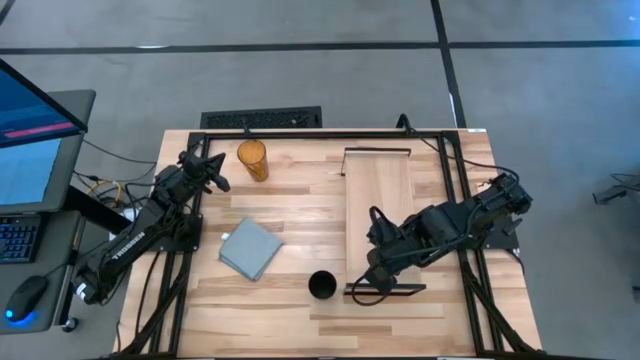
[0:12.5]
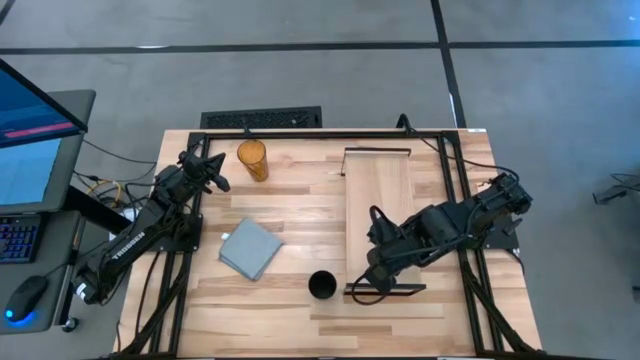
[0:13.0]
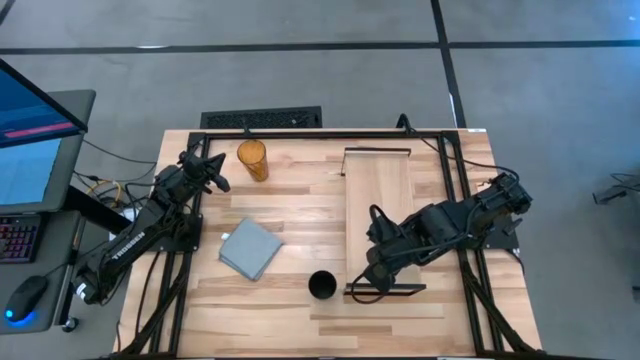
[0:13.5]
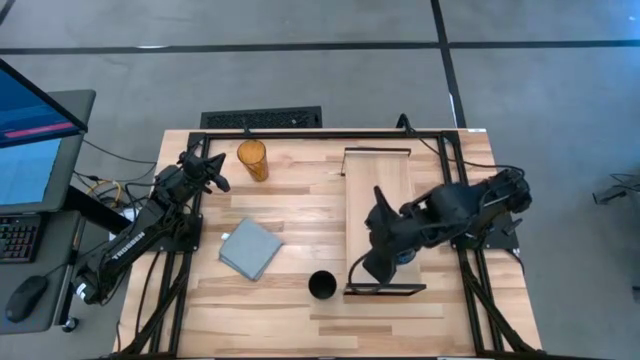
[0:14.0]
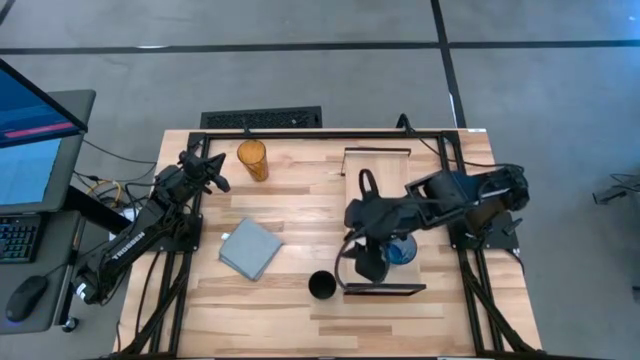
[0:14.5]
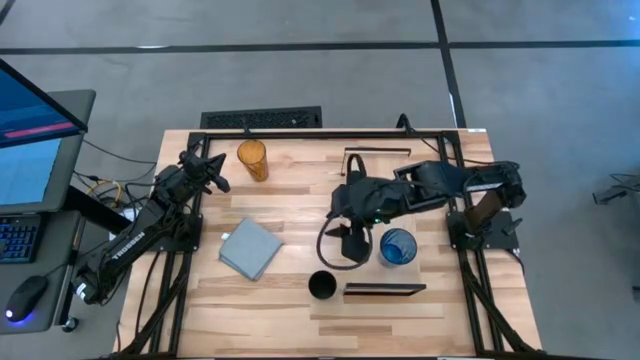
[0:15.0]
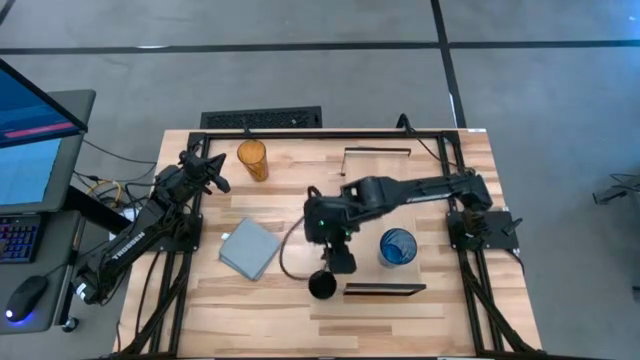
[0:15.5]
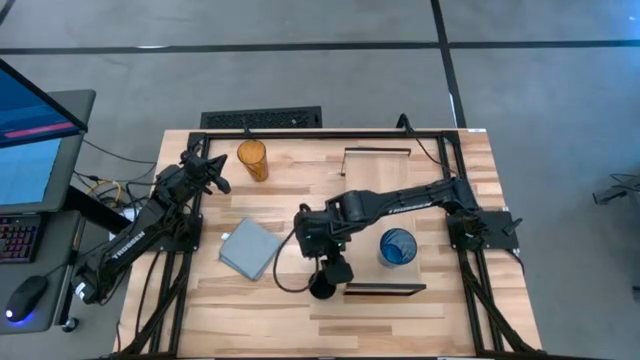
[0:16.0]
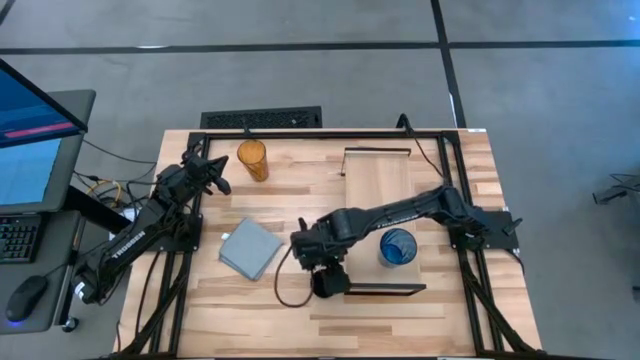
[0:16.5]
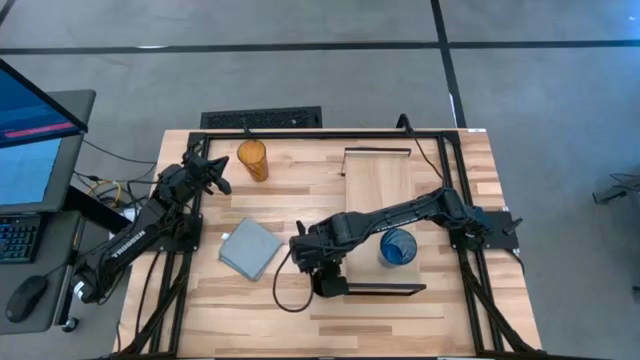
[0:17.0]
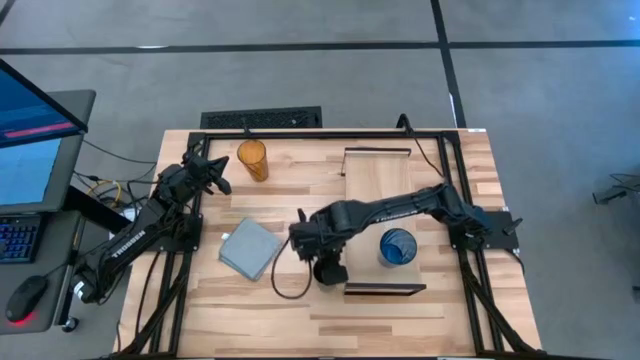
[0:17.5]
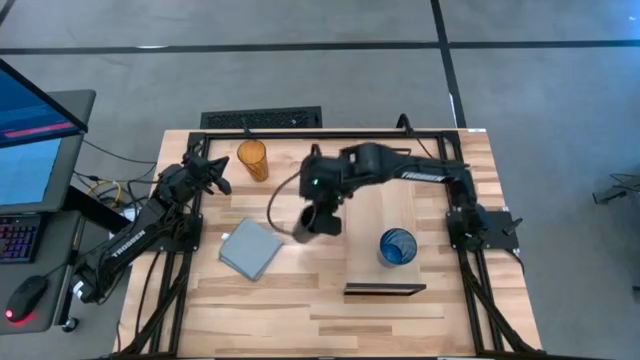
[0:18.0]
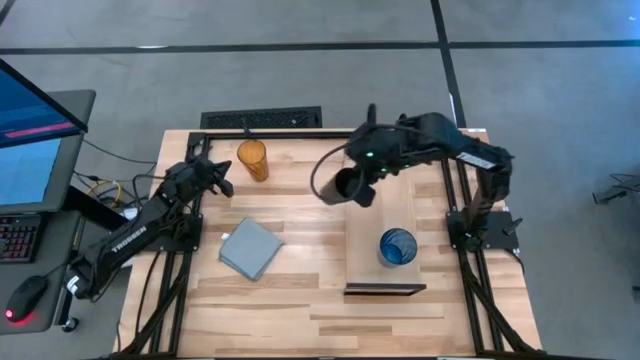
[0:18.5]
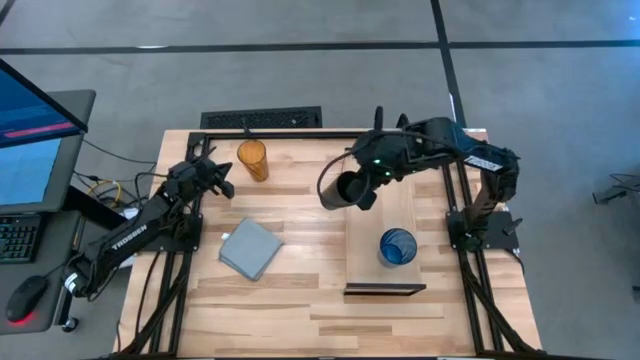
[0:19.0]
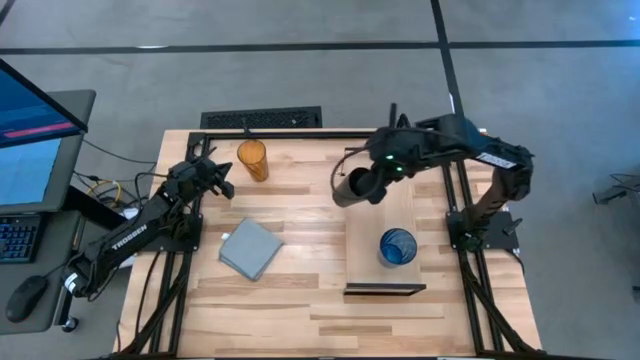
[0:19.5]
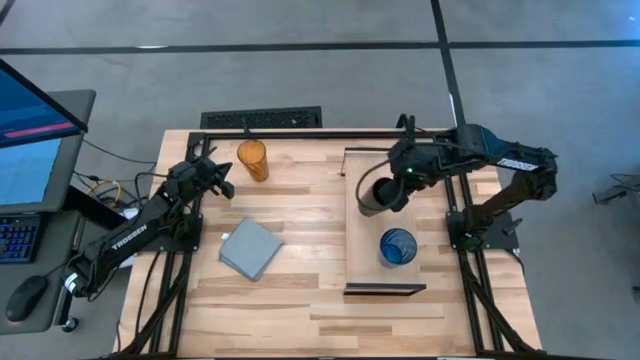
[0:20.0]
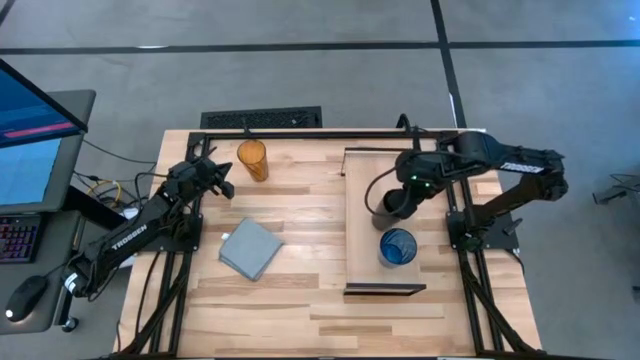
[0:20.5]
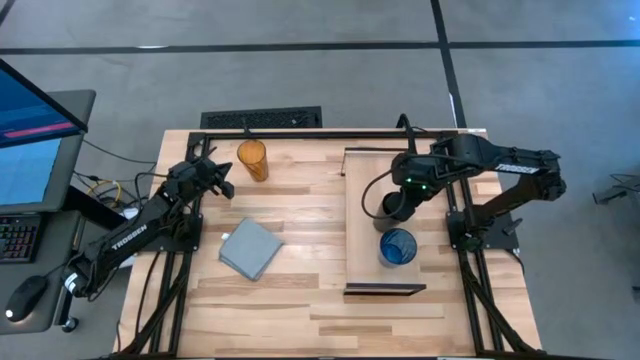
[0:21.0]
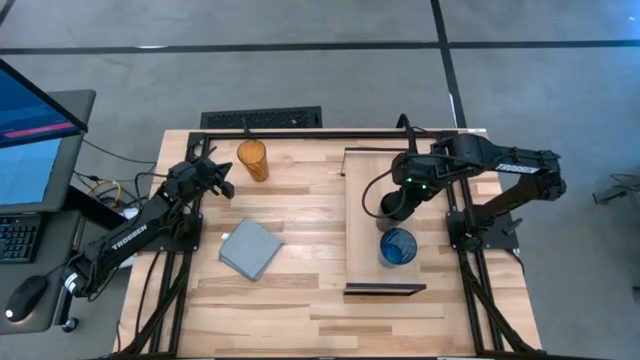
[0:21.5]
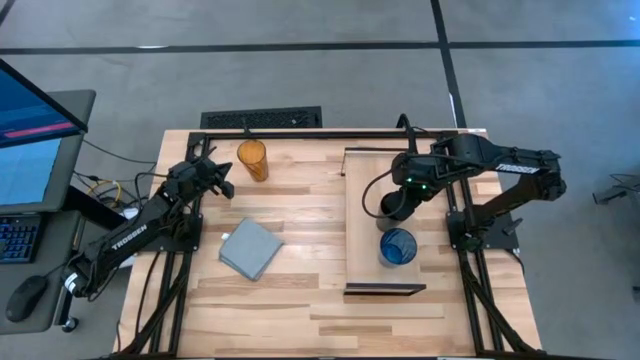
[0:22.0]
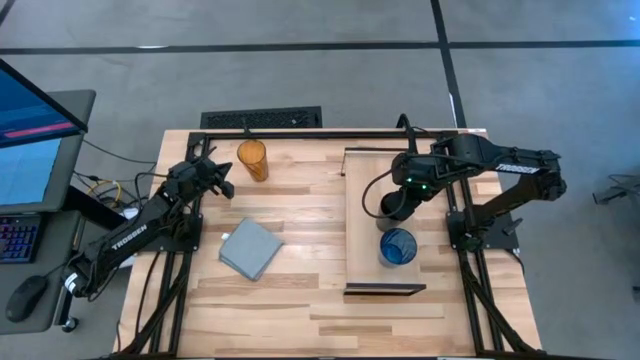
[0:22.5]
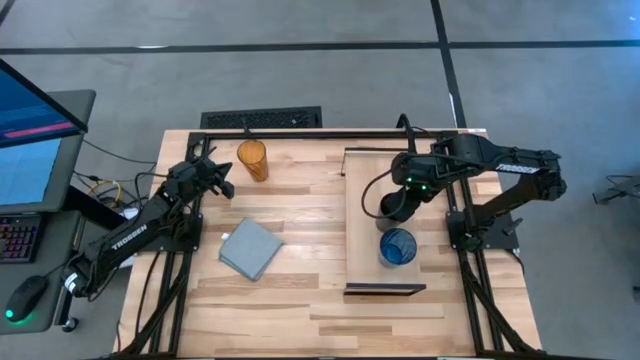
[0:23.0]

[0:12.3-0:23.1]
Task: Stack small to large cups/mugs on shelf
Put the black cup on the shelf

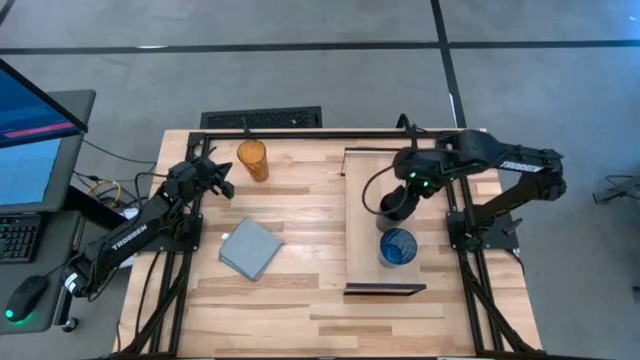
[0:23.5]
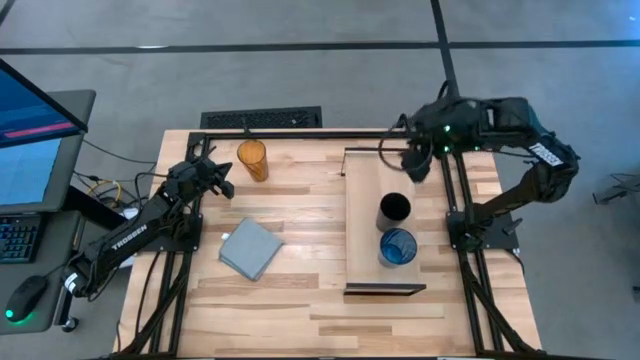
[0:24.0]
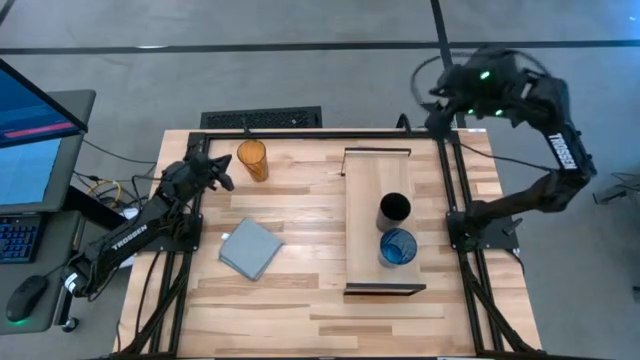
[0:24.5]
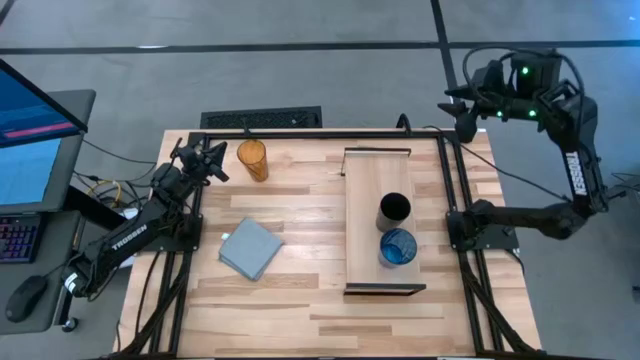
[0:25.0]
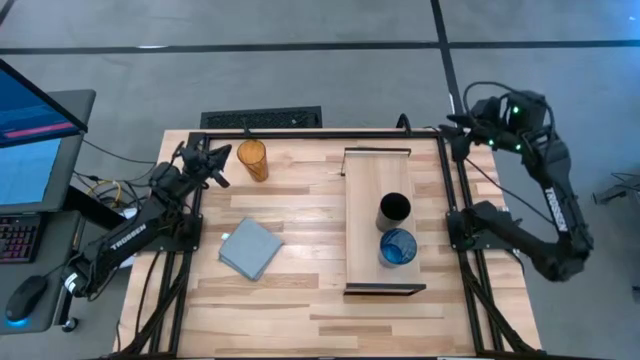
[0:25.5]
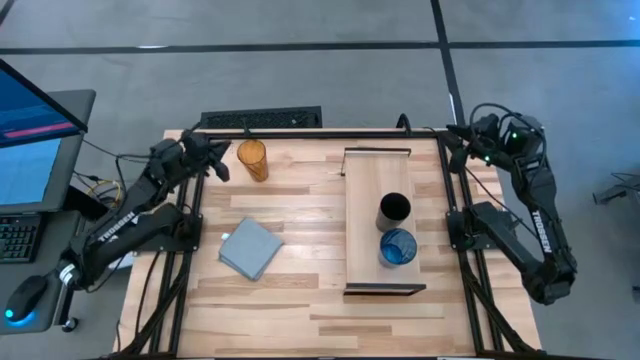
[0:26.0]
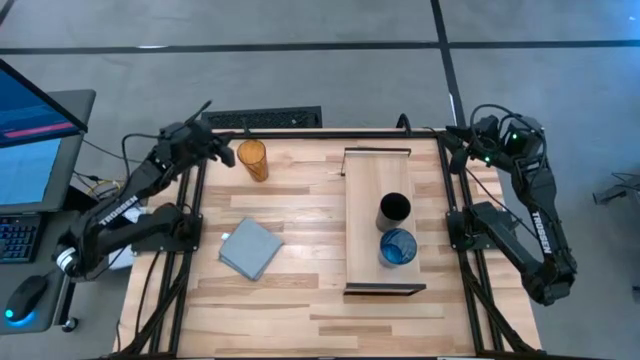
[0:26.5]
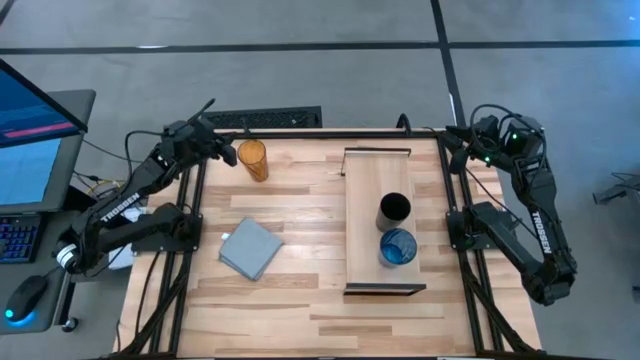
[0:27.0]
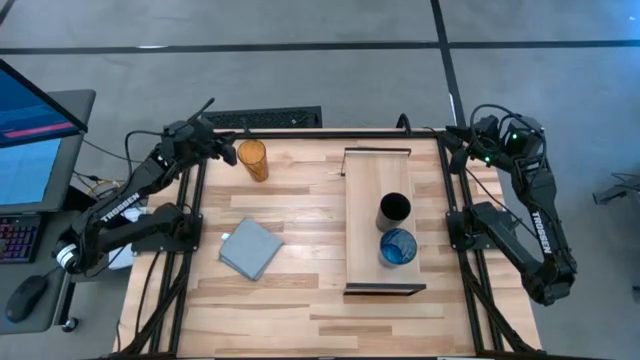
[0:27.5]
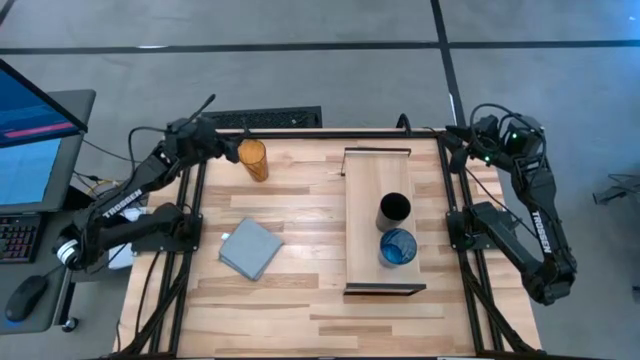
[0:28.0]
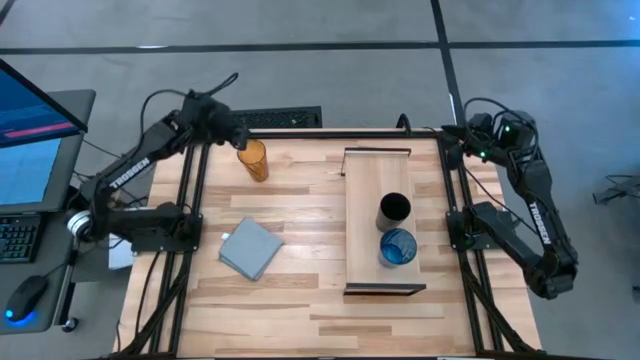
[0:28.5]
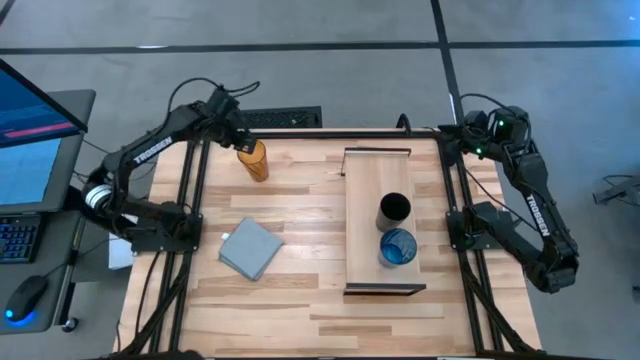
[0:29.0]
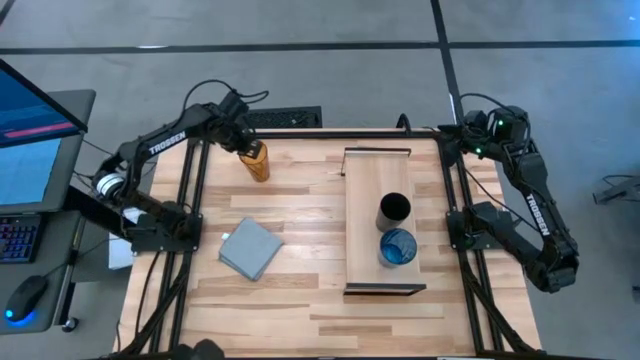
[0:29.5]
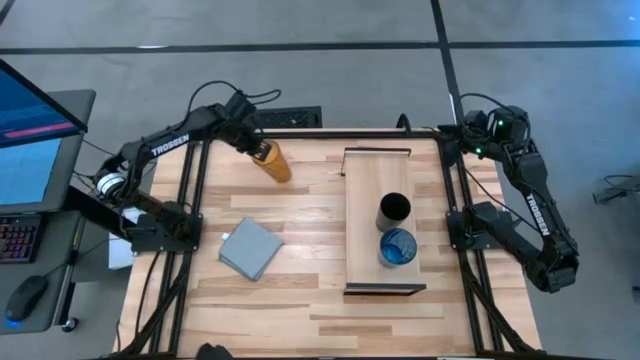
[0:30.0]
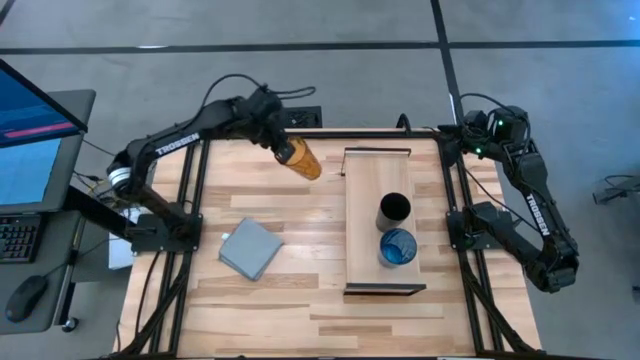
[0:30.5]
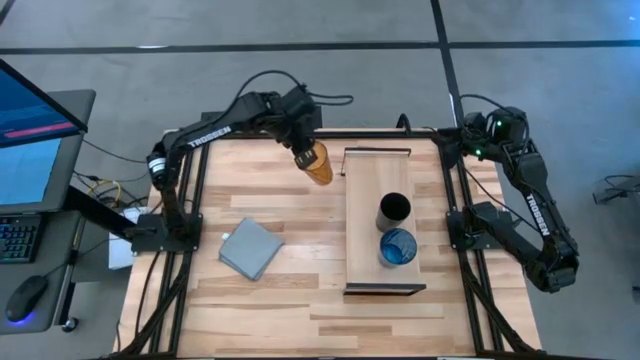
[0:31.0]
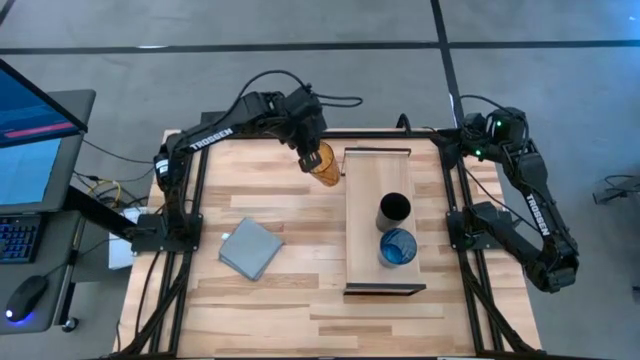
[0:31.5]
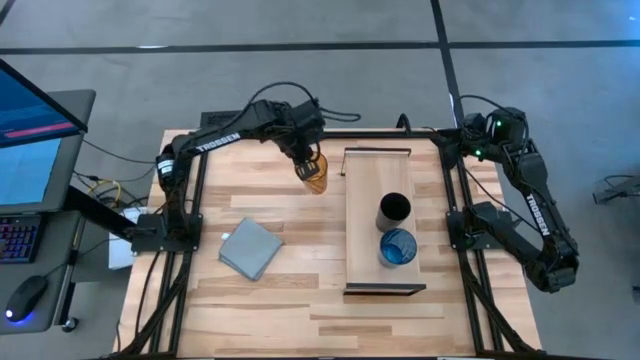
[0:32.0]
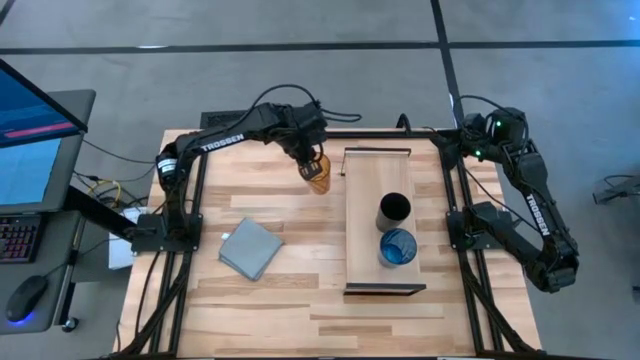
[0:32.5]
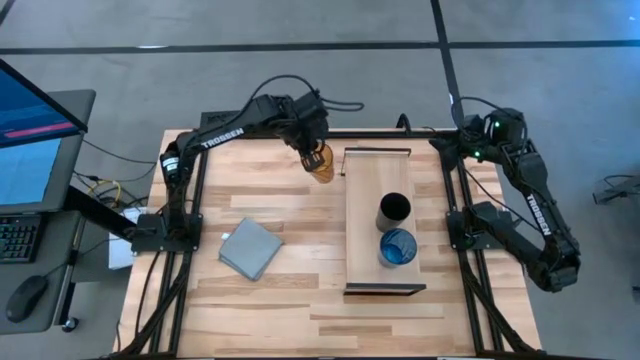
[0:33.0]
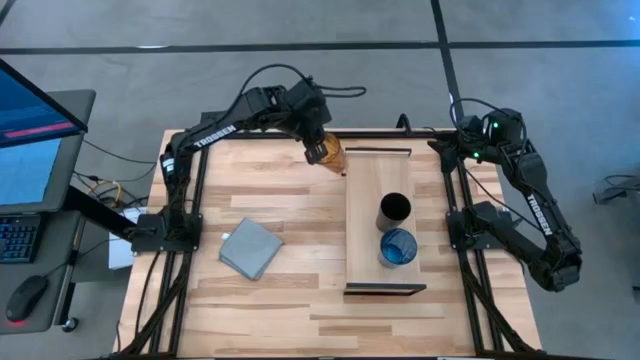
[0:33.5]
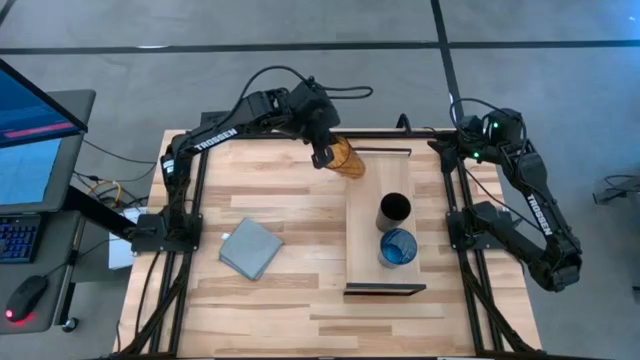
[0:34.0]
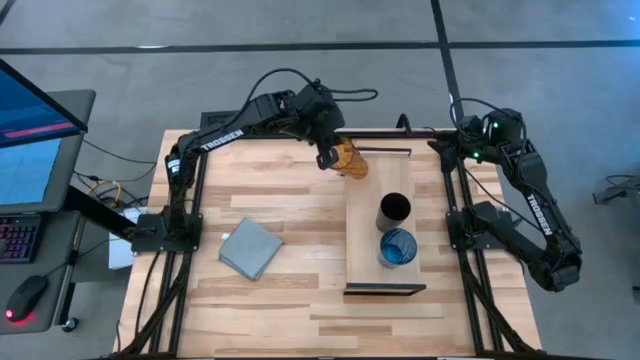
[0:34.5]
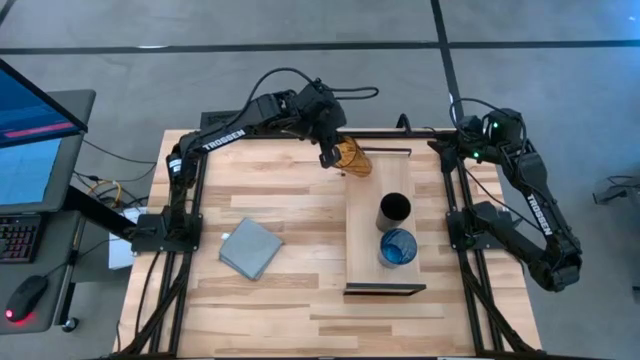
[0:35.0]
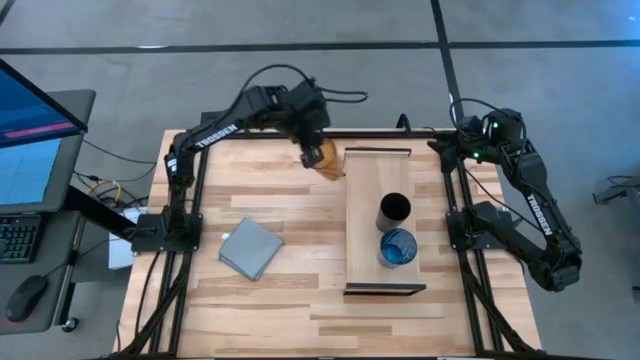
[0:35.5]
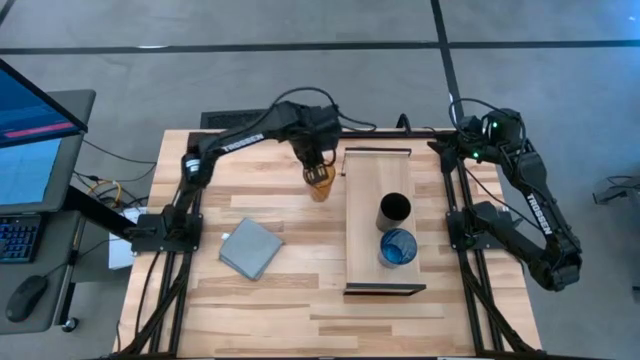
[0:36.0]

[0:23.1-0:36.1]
Put the brown cup on the shelf
